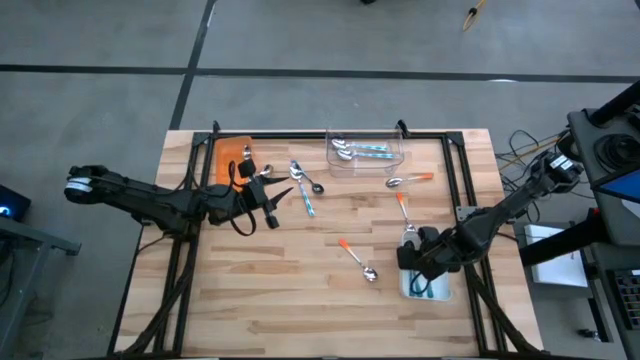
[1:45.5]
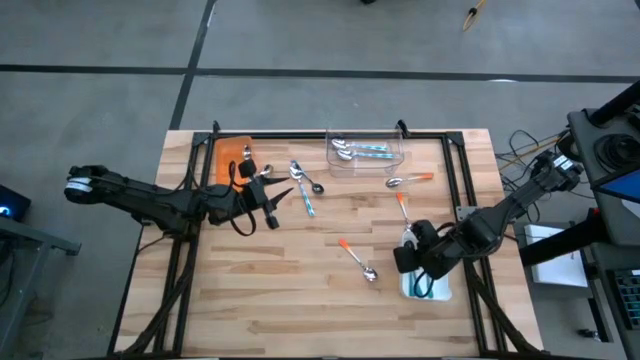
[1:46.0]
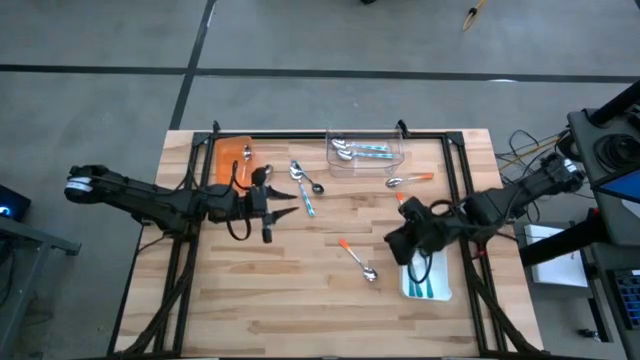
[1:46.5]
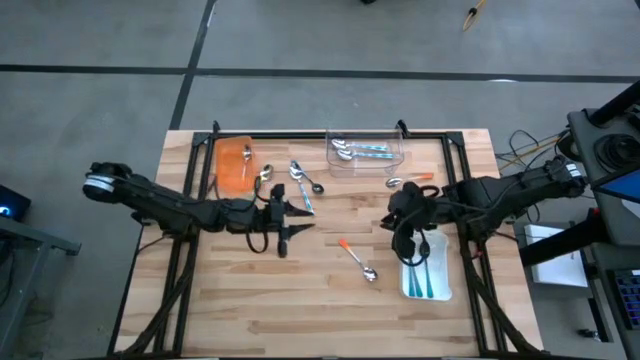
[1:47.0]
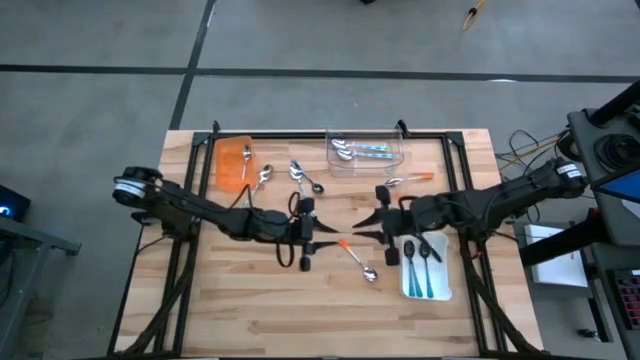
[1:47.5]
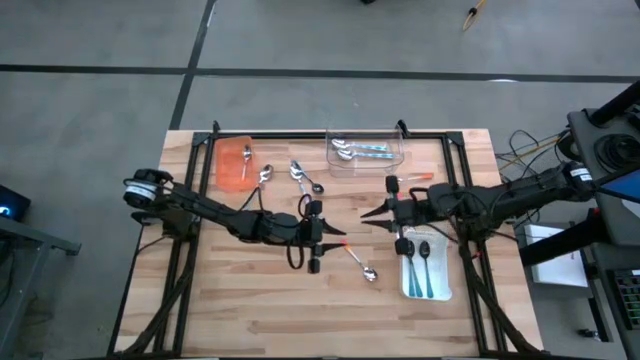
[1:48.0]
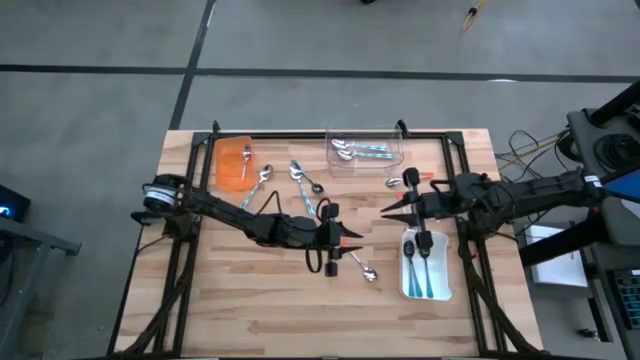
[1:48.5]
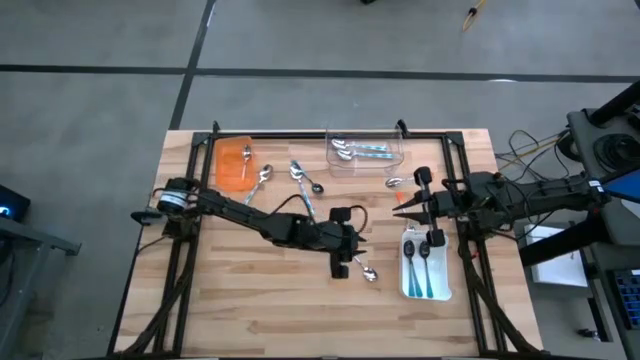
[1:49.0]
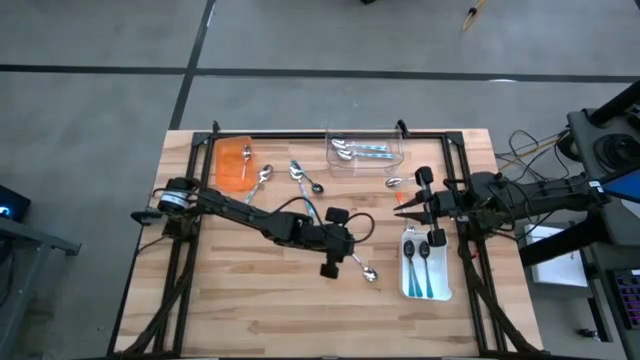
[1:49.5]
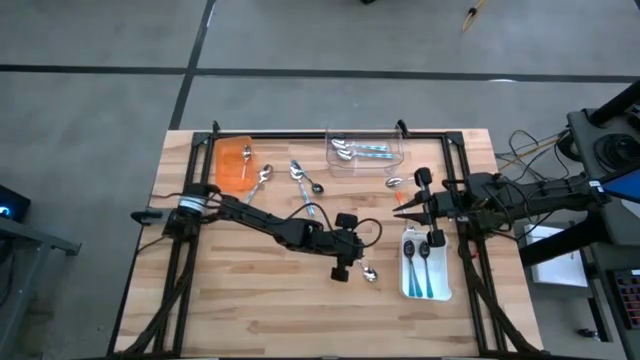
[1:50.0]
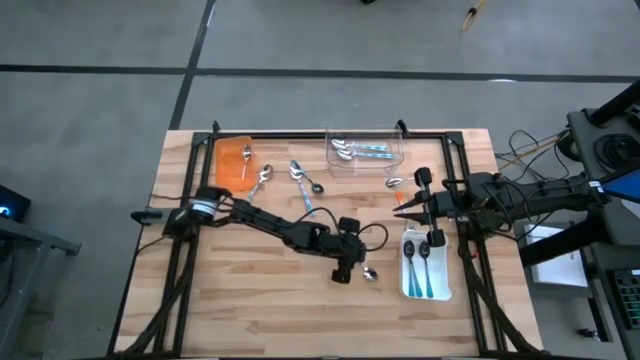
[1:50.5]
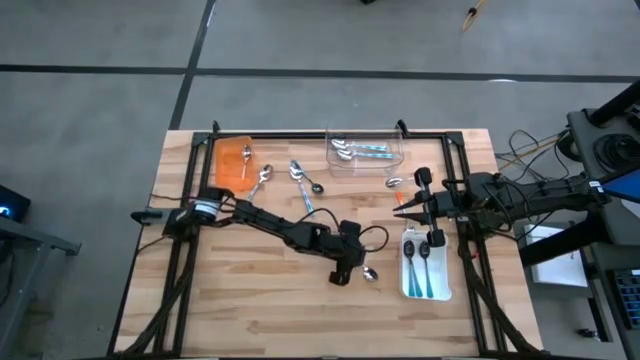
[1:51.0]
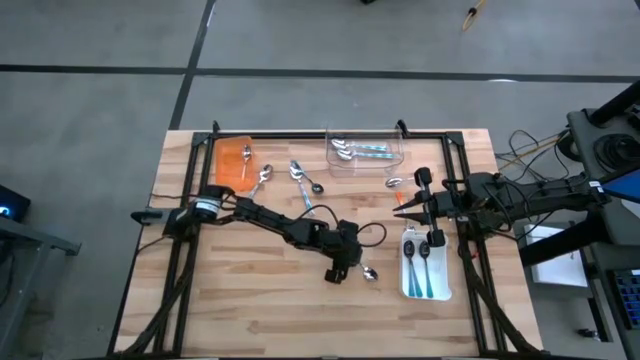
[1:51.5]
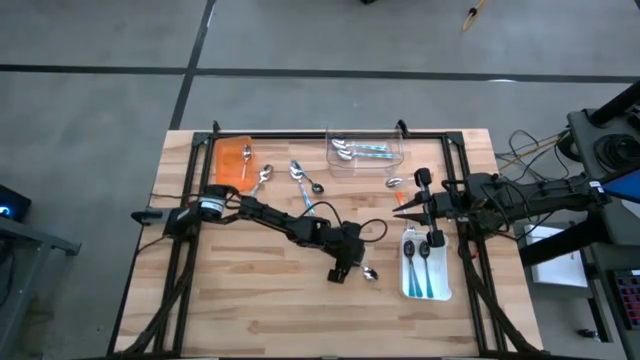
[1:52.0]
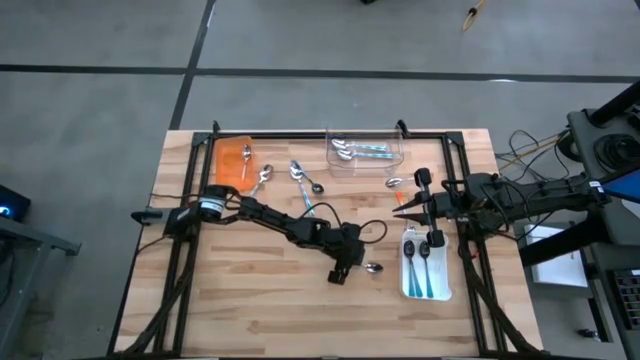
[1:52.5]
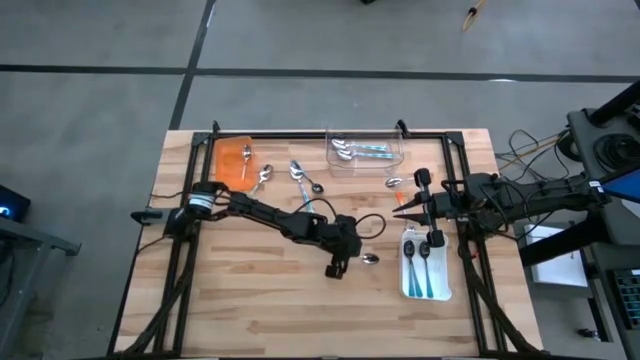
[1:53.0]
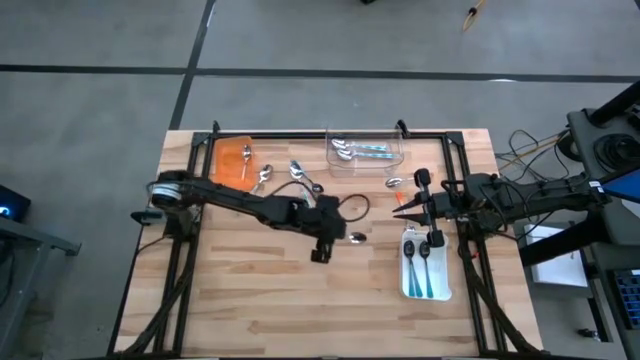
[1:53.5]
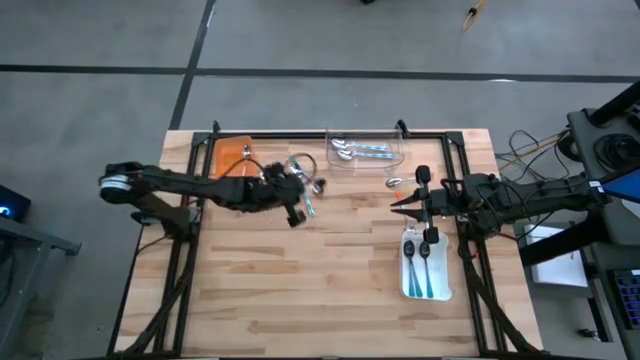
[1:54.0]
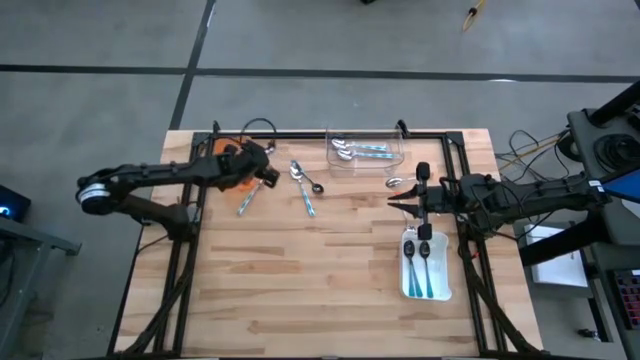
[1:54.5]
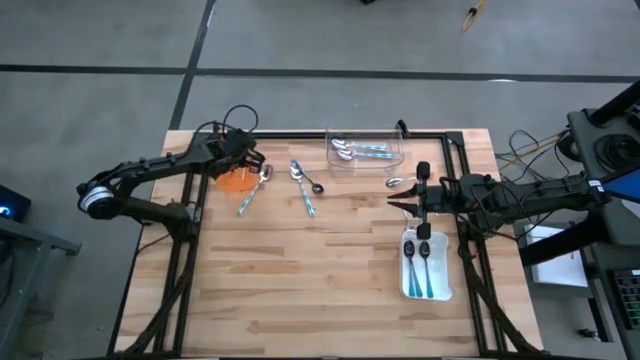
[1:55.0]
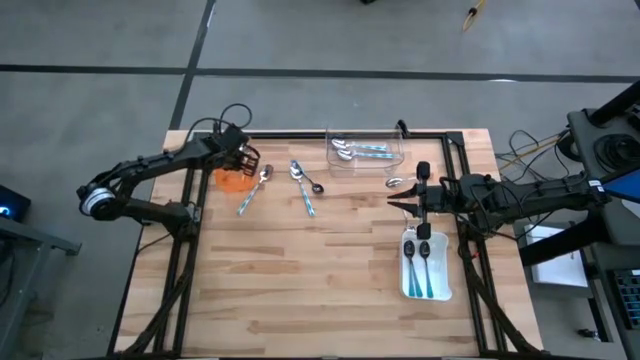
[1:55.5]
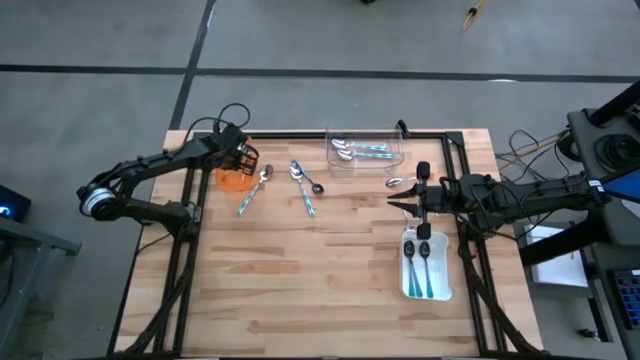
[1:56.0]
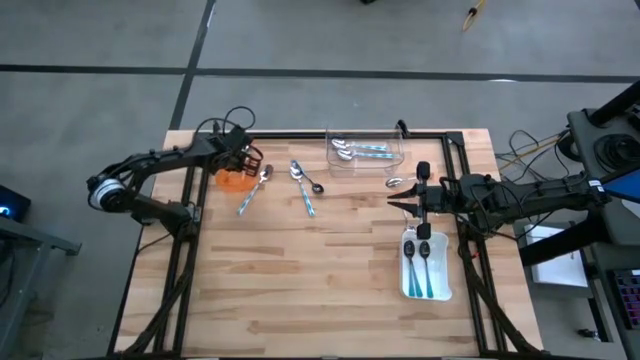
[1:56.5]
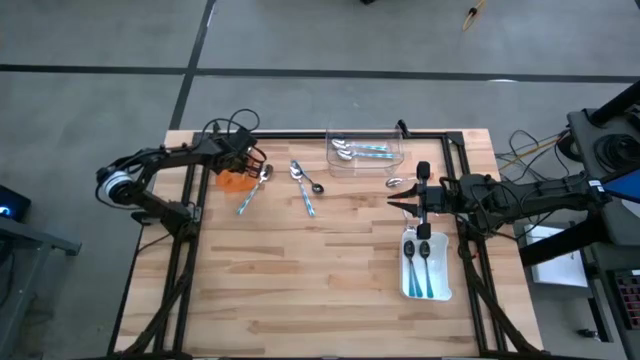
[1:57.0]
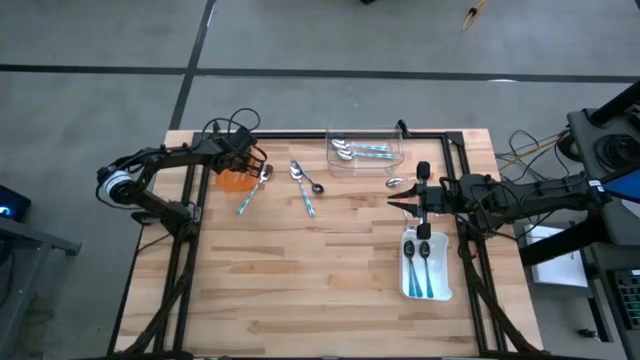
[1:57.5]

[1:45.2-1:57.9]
Task: Sort silverware by color (type)
Put the orange spoon into the orange bin

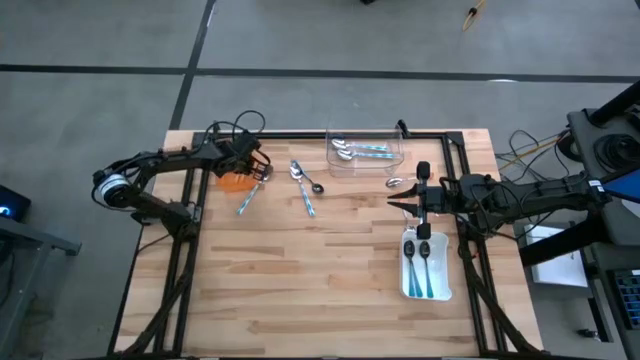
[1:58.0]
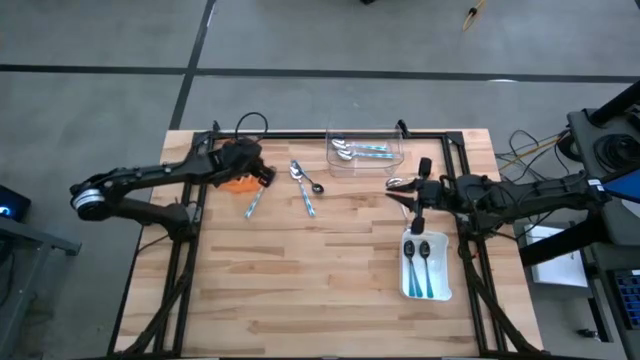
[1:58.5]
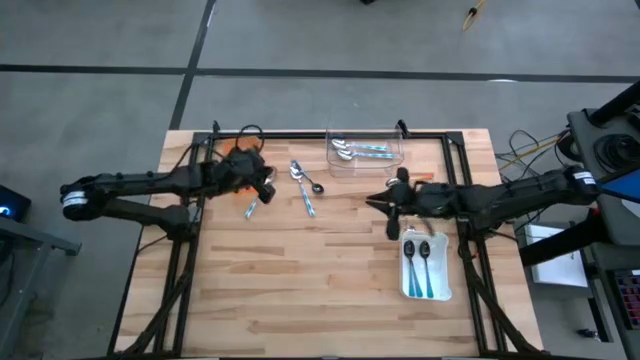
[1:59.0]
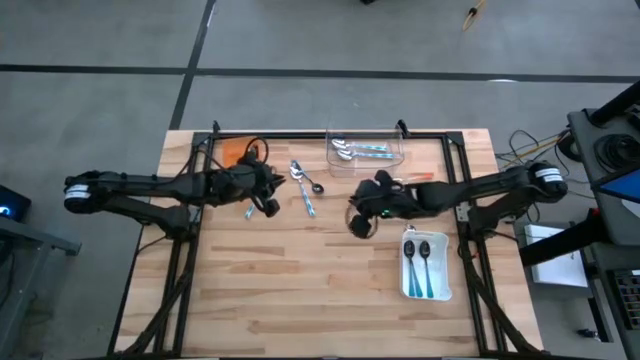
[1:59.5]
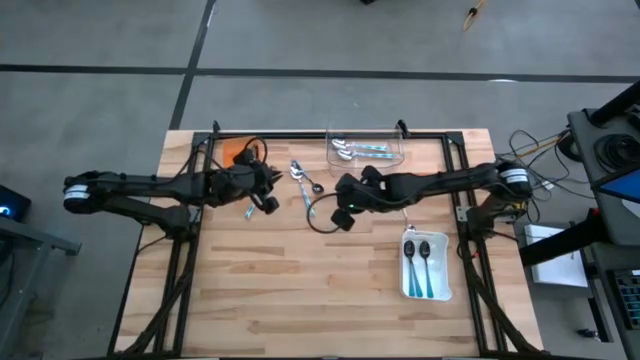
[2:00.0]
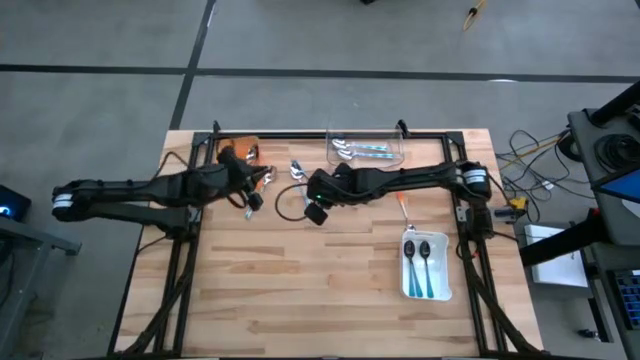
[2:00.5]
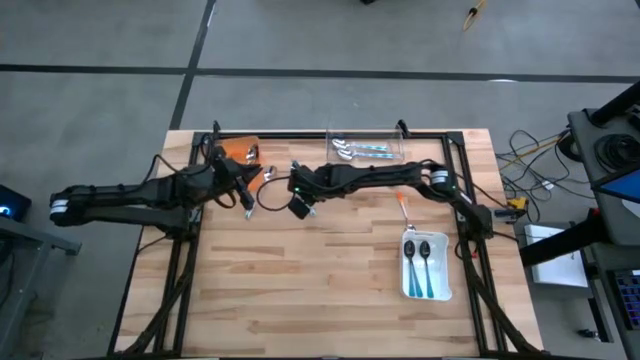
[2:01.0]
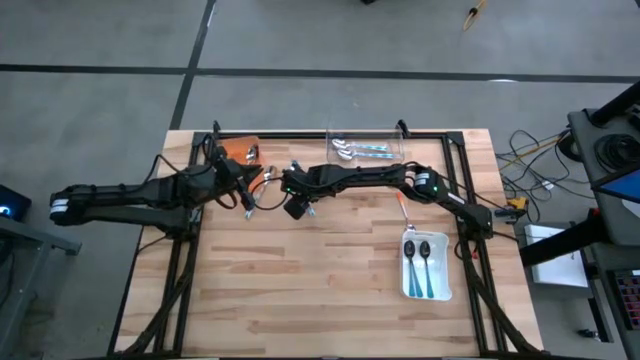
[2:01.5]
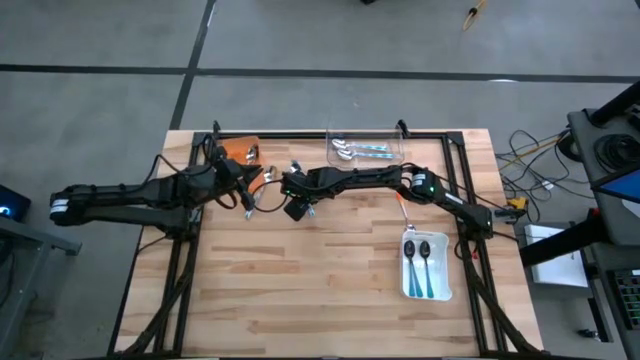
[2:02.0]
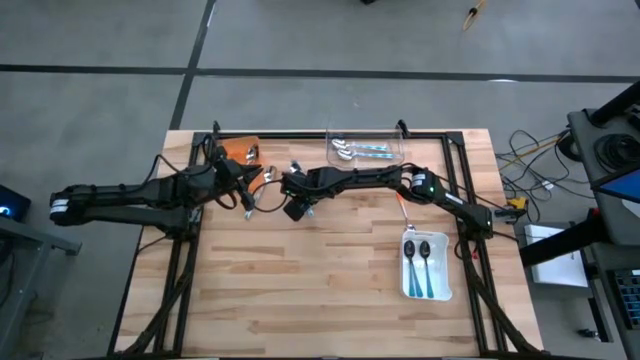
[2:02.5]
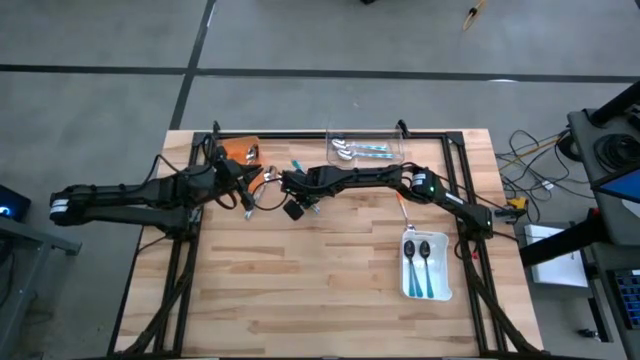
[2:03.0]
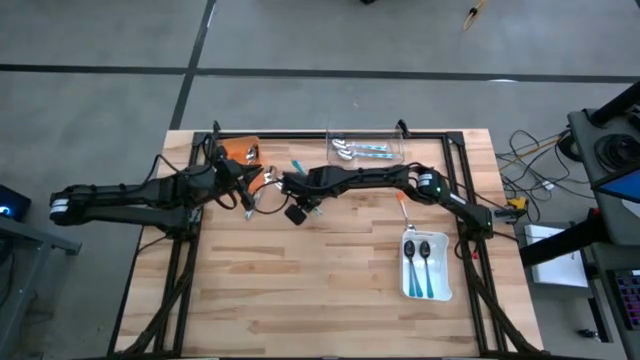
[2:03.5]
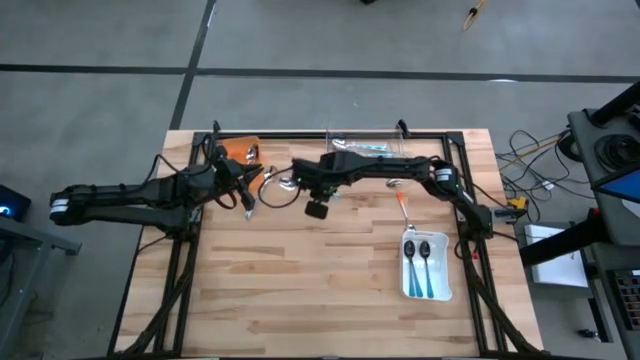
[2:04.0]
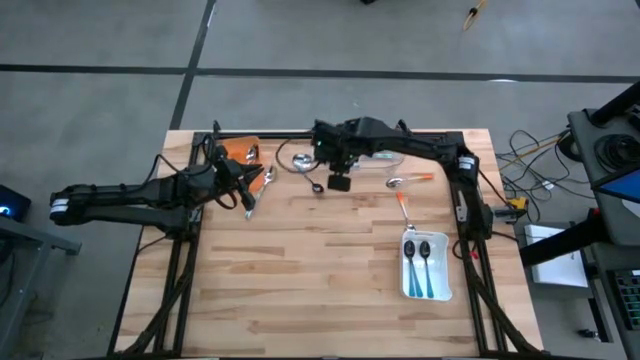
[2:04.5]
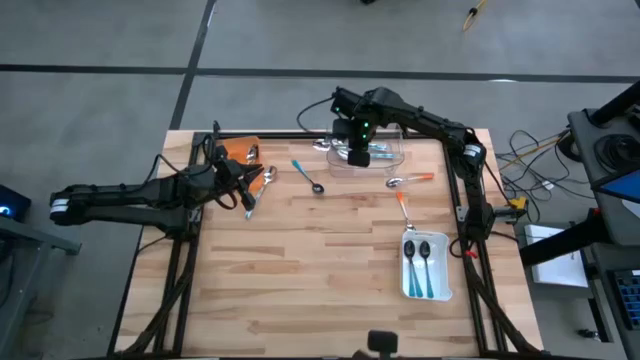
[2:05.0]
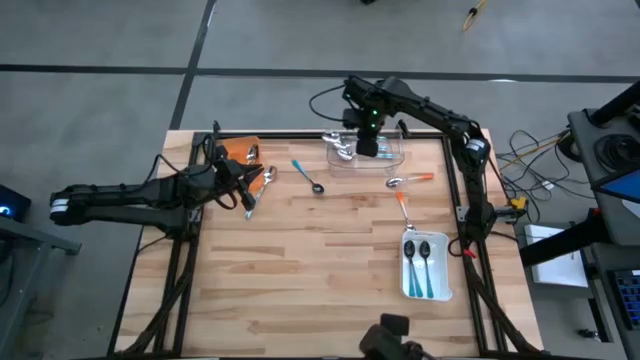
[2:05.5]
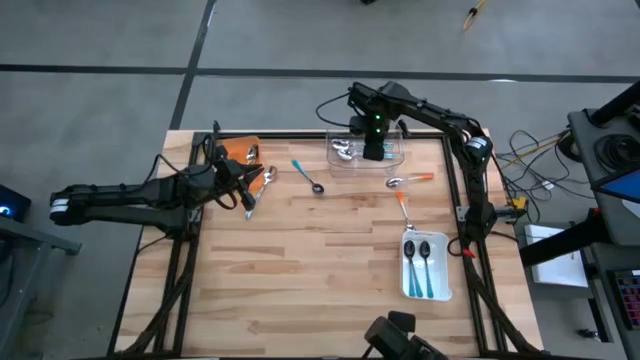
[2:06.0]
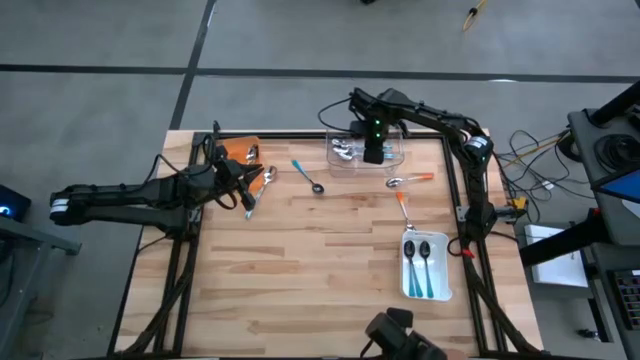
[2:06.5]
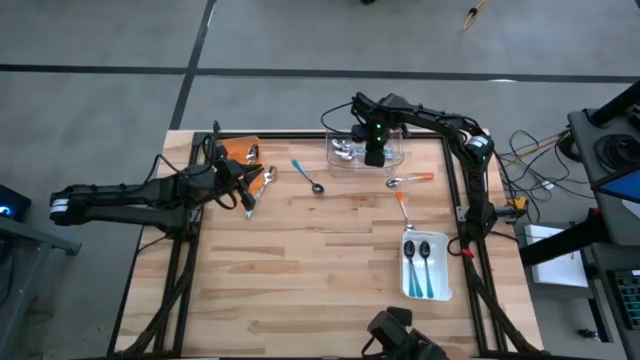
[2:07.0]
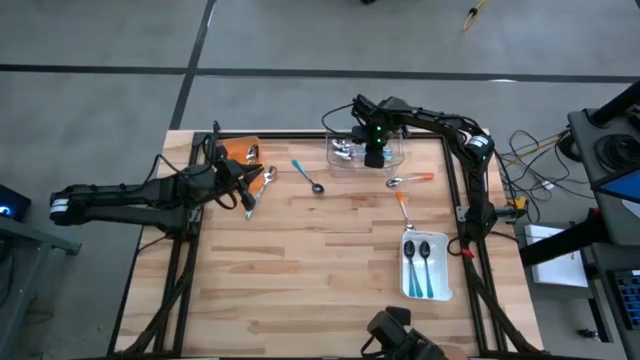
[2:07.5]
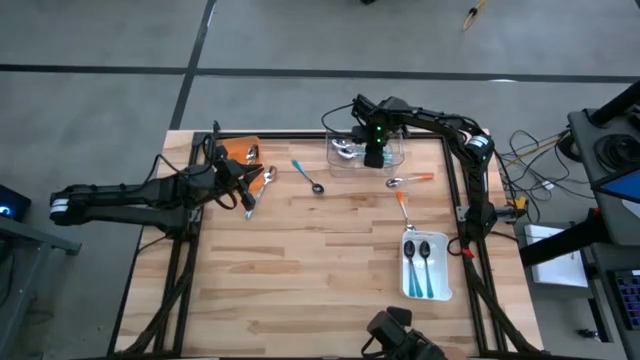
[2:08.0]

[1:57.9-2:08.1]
Put the blue patterned spoon into the transparent bin
